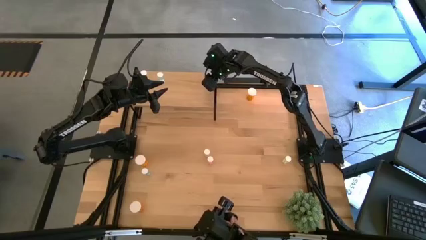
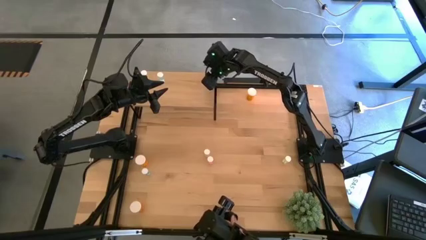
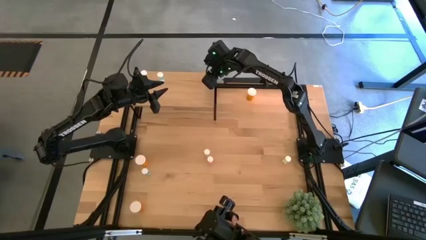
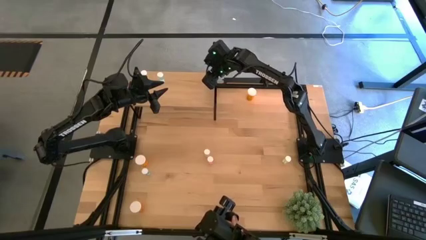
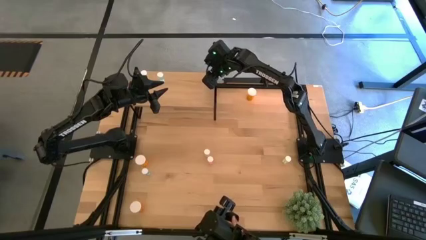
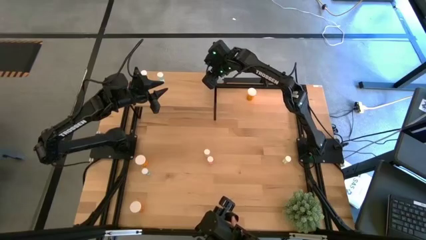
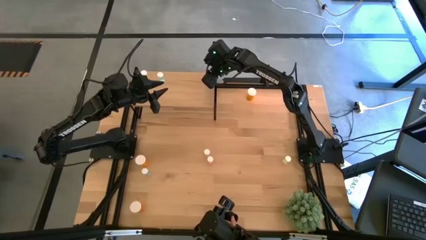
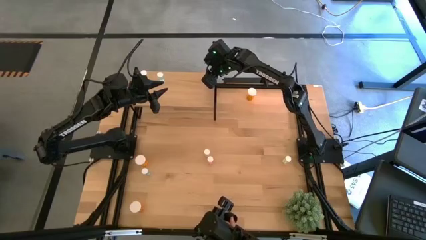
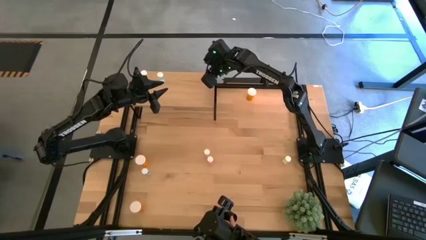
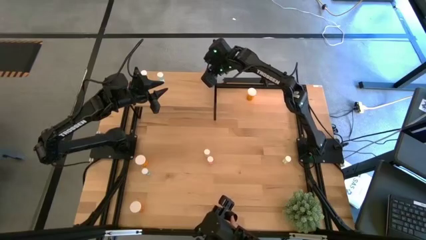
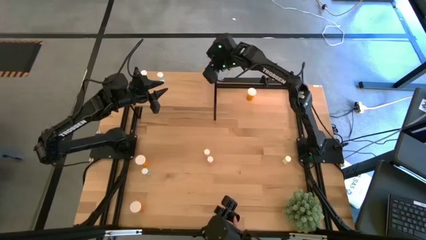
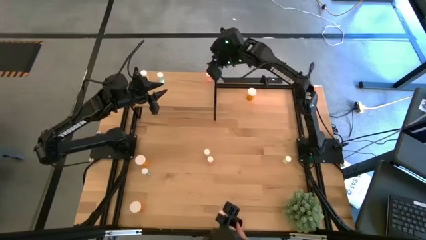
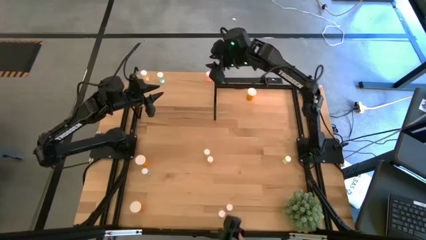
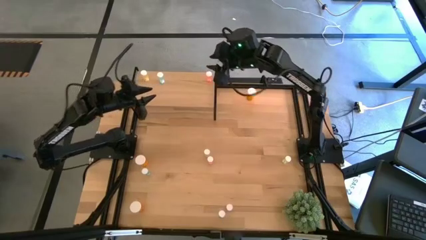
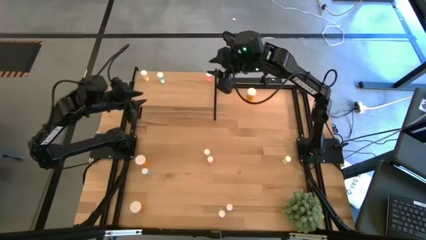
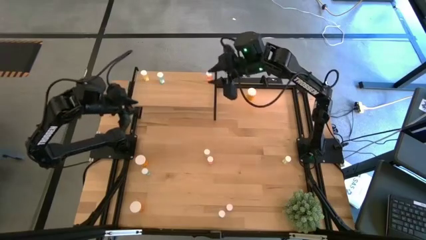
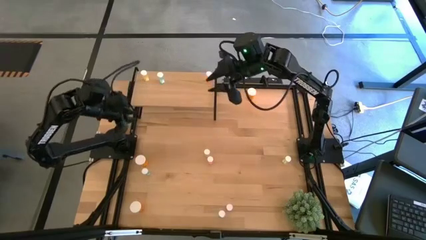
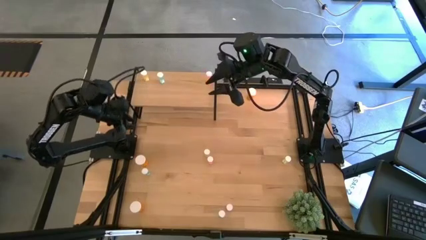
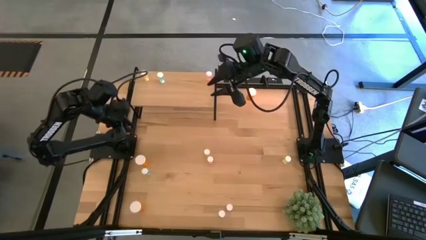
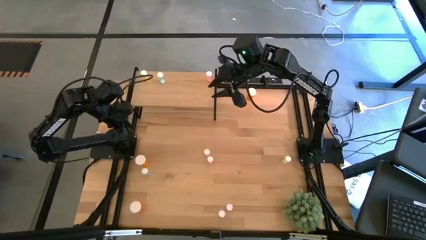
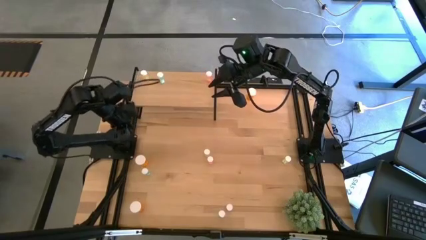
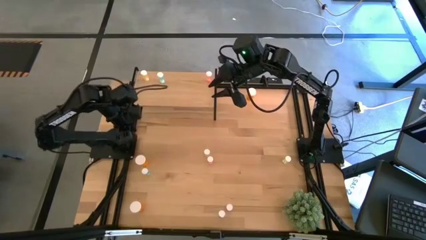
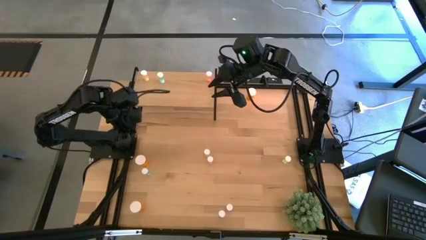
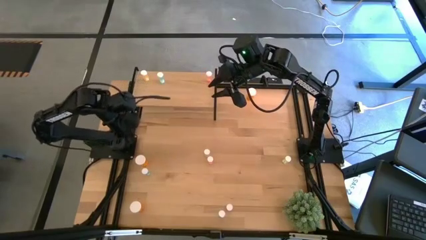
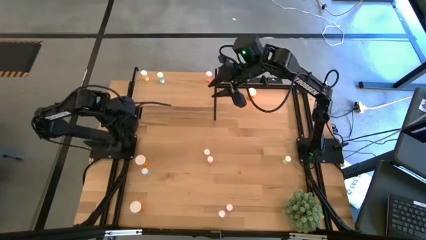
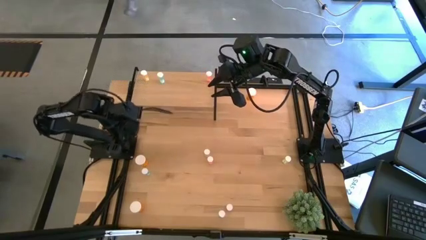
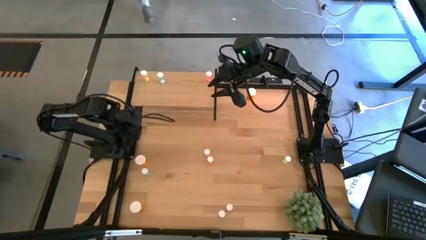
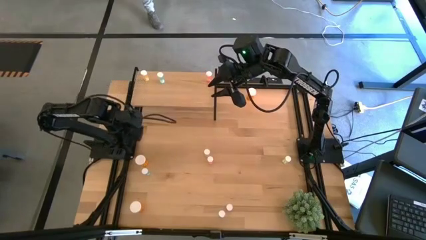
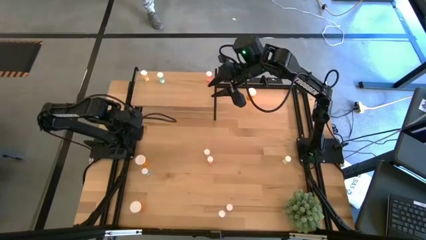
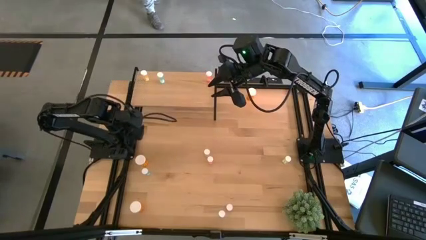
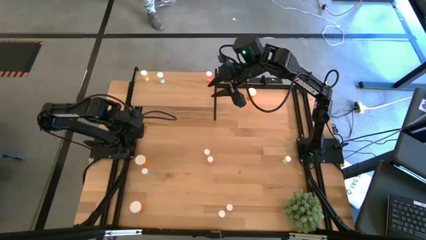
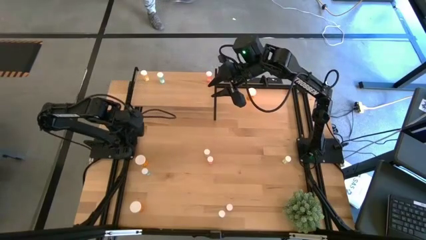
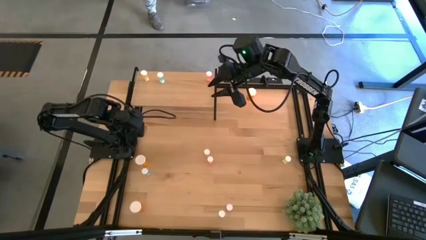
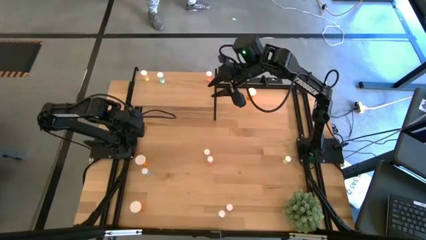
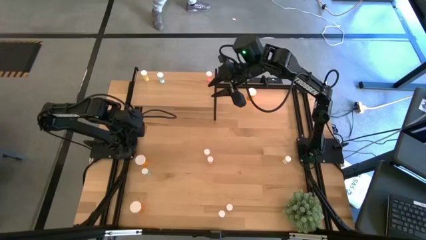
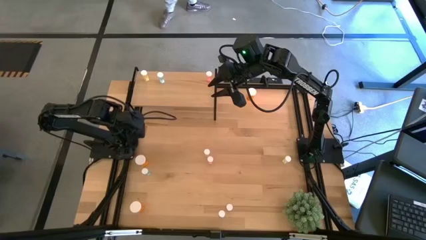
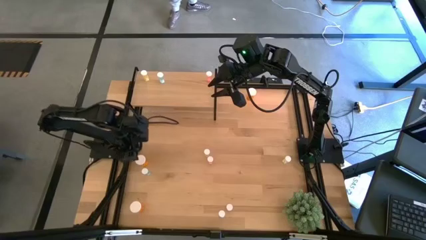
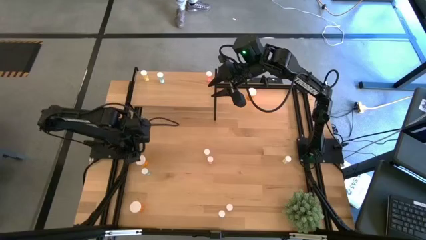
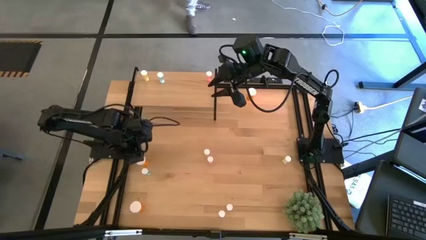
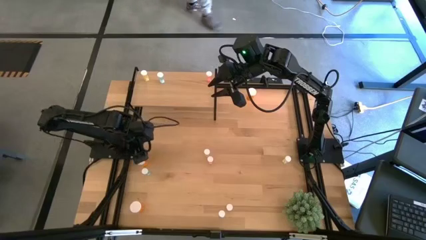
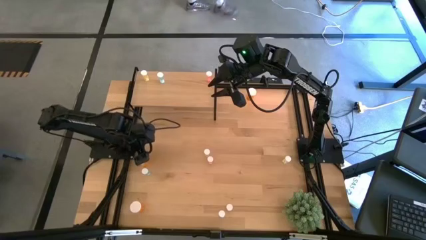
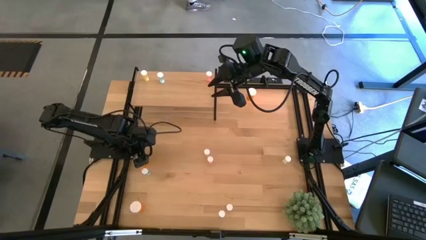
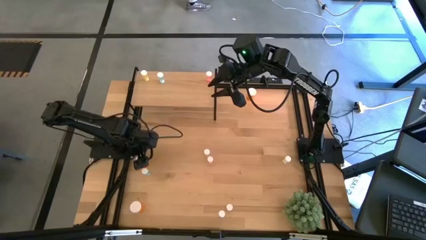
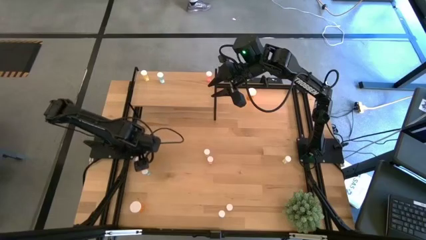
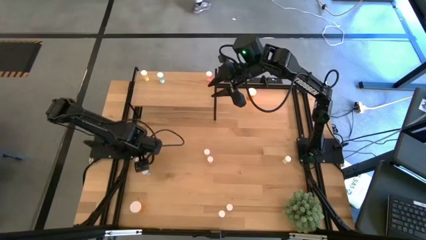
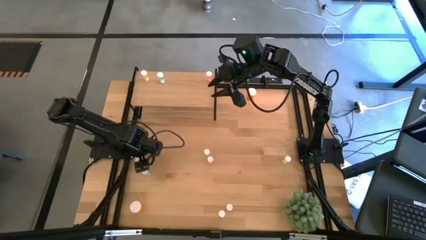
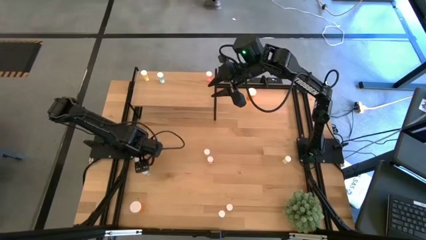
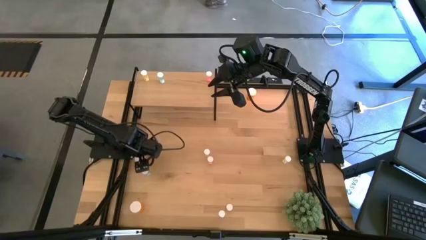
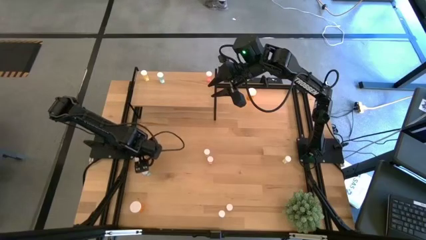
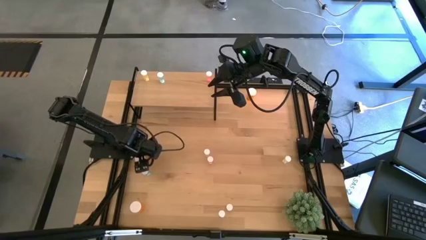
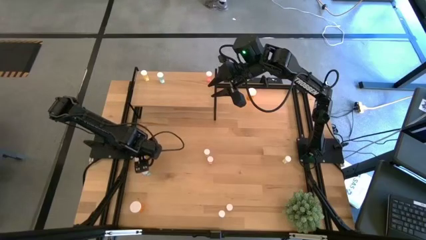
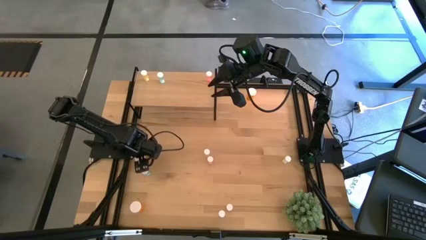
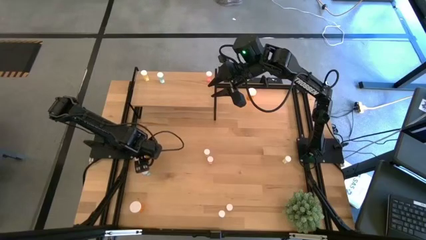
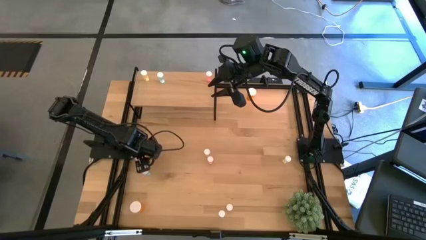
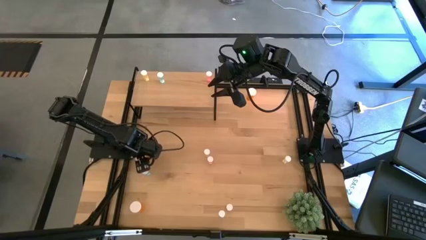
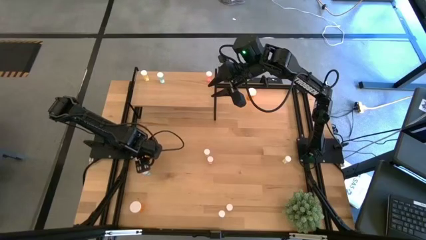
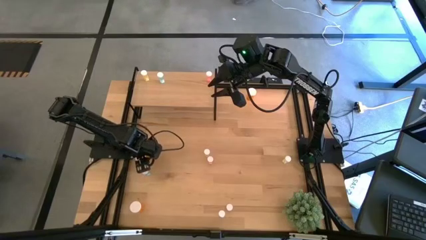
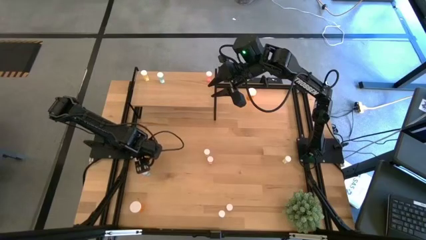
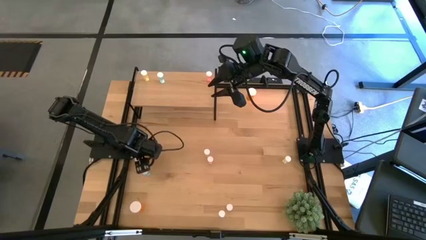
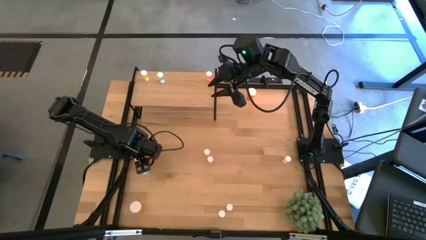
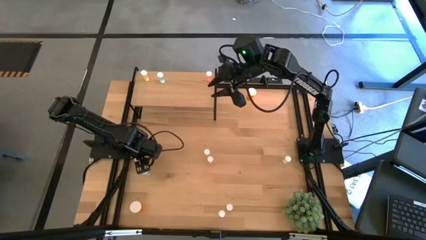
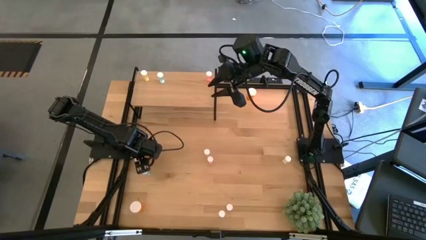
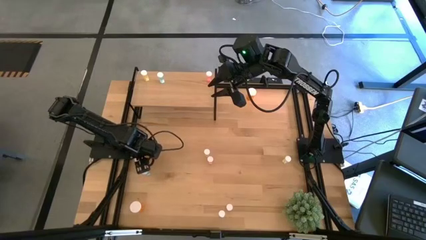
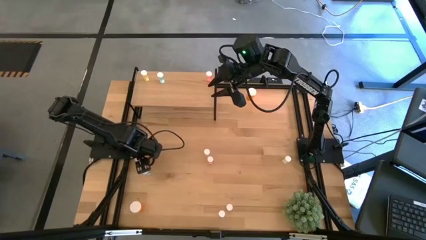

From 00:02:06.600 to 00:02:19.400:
Task: Pick and place medicine bottles onto shelf by color
Put the middle left big orange pill bottle on the shelf
